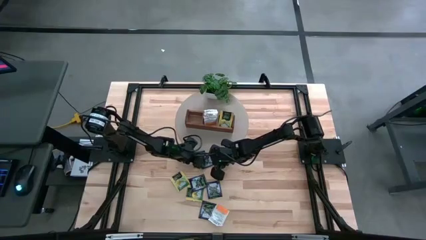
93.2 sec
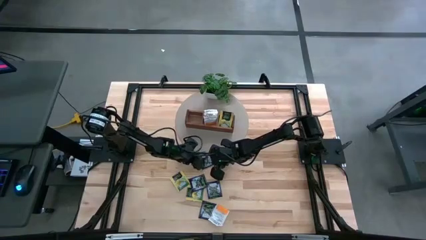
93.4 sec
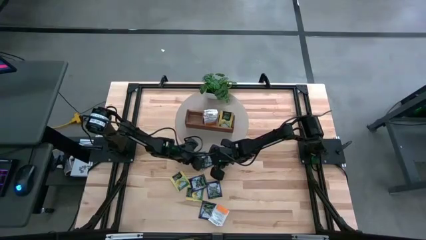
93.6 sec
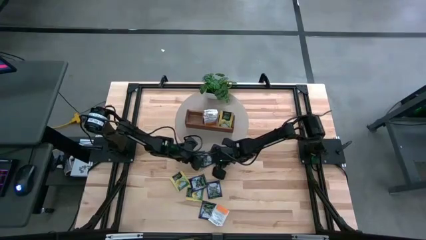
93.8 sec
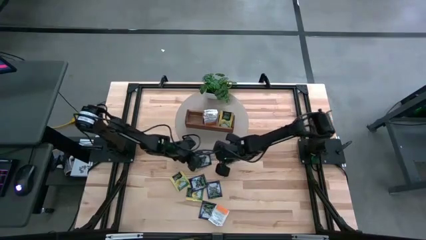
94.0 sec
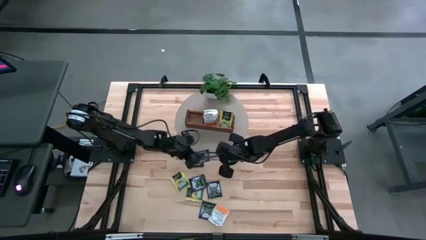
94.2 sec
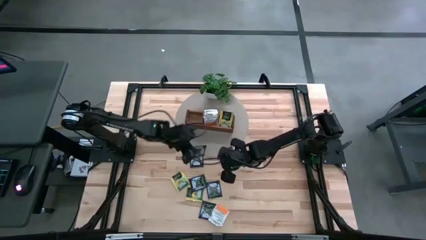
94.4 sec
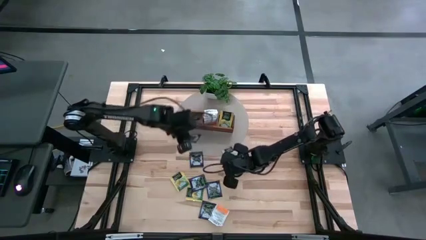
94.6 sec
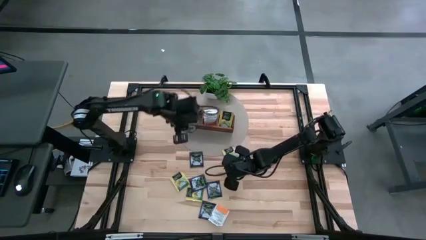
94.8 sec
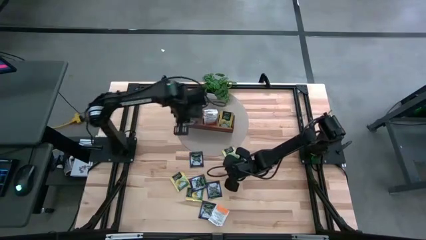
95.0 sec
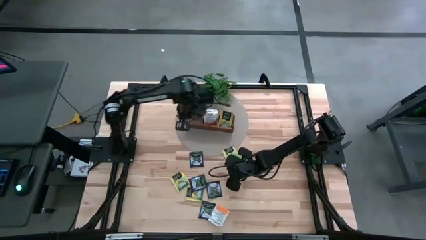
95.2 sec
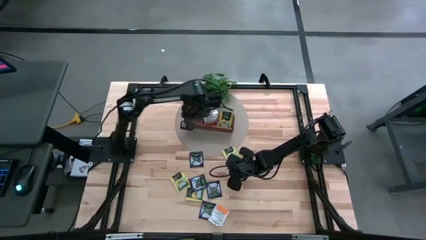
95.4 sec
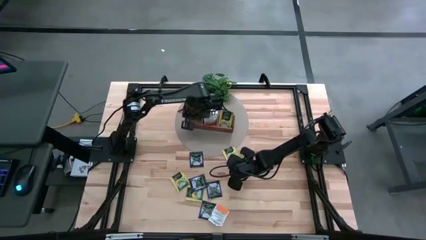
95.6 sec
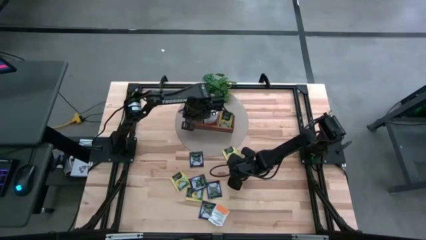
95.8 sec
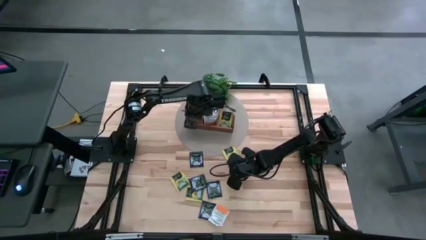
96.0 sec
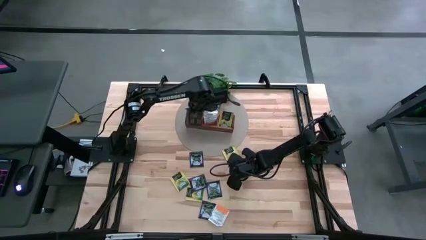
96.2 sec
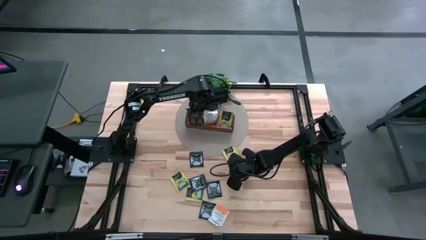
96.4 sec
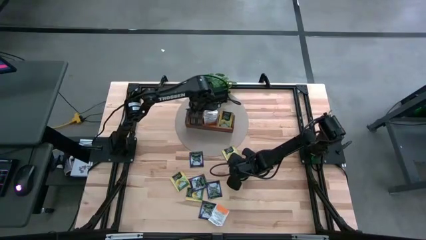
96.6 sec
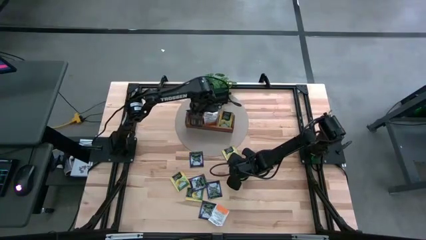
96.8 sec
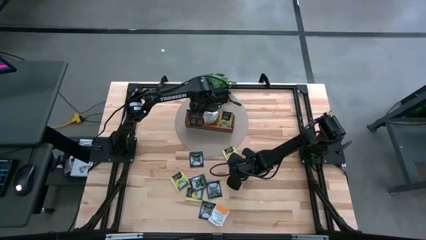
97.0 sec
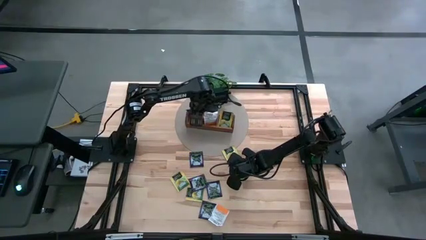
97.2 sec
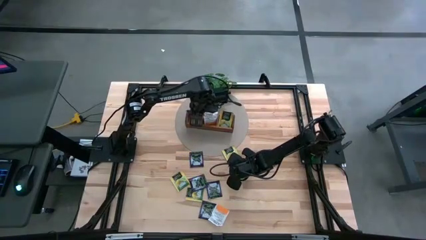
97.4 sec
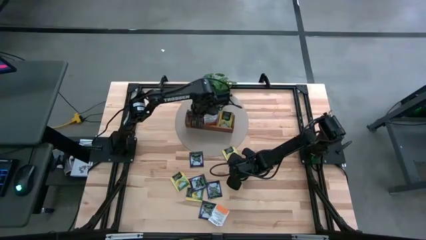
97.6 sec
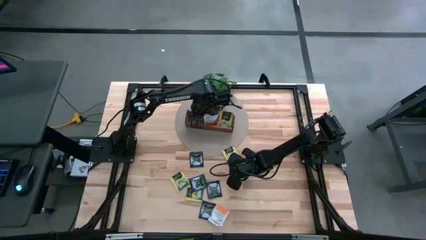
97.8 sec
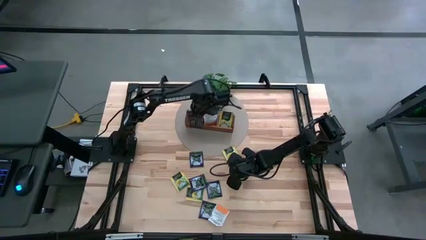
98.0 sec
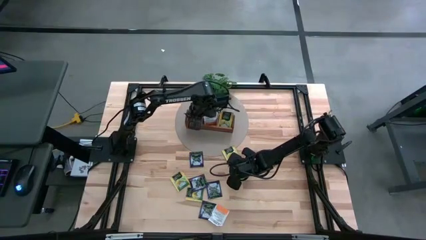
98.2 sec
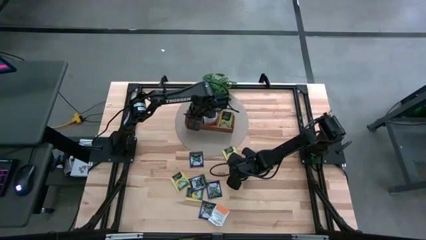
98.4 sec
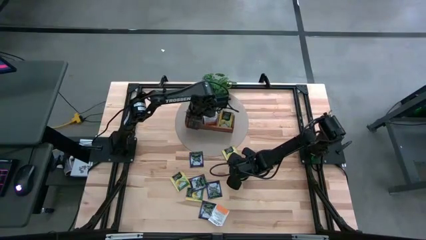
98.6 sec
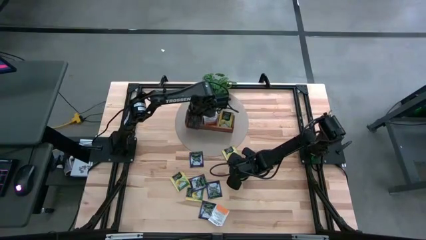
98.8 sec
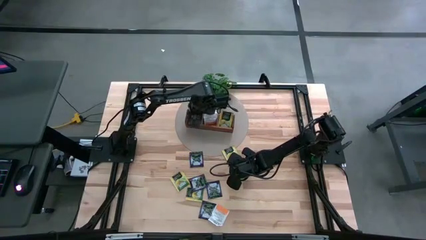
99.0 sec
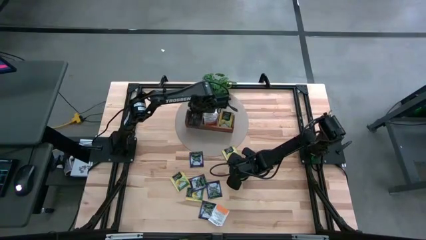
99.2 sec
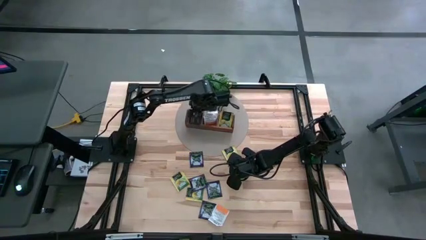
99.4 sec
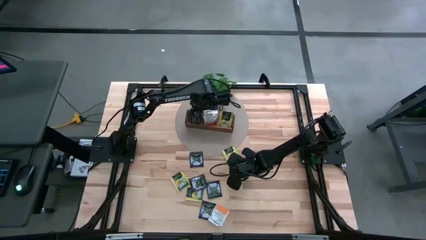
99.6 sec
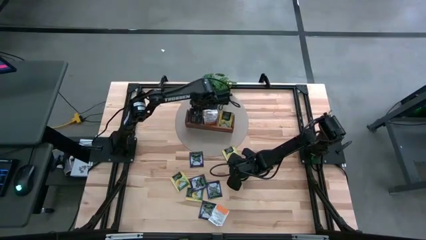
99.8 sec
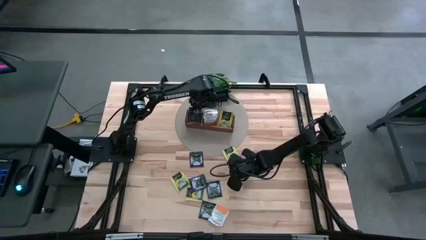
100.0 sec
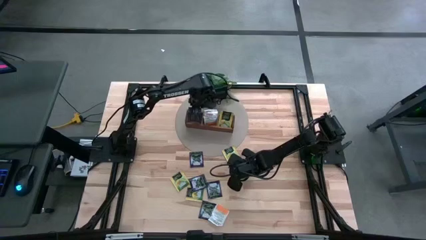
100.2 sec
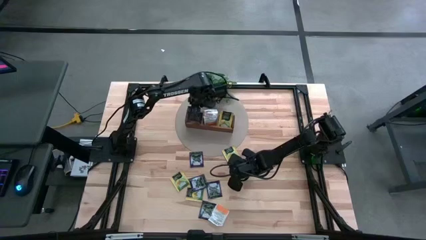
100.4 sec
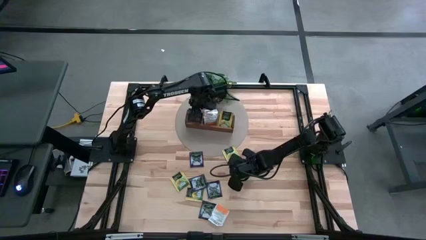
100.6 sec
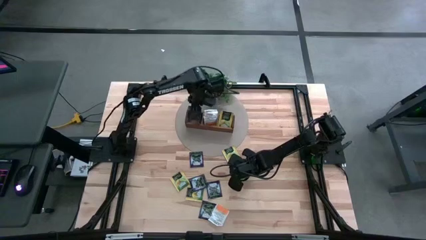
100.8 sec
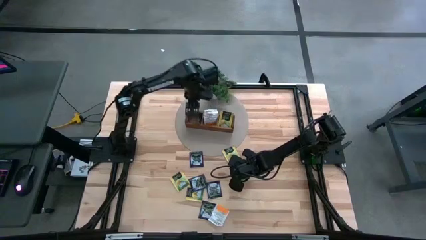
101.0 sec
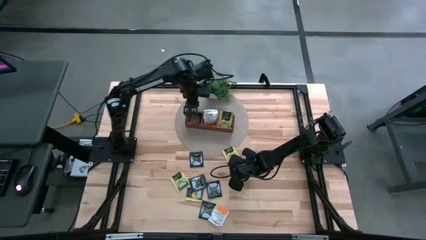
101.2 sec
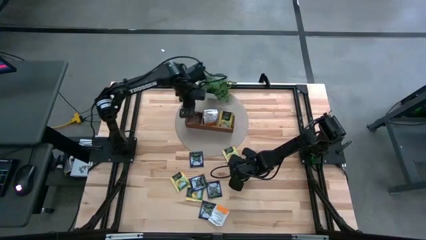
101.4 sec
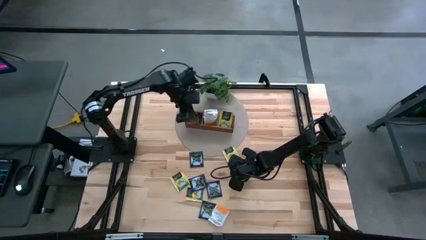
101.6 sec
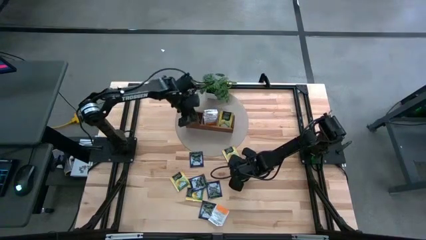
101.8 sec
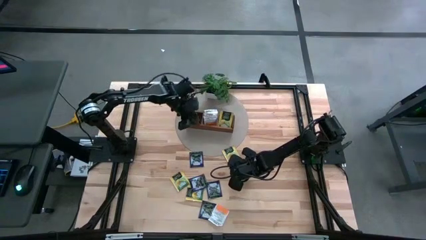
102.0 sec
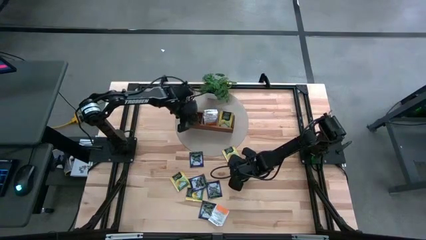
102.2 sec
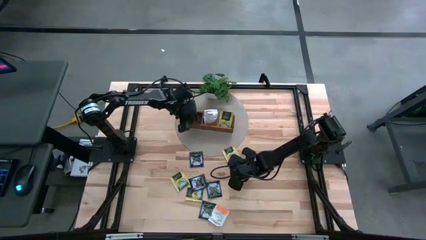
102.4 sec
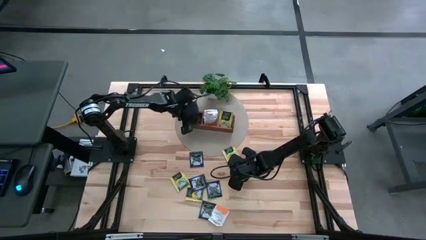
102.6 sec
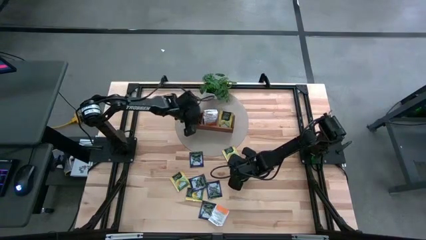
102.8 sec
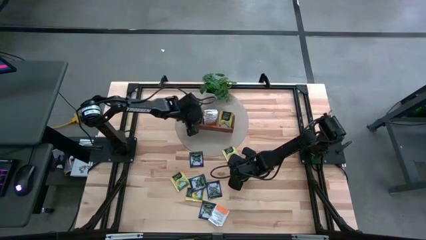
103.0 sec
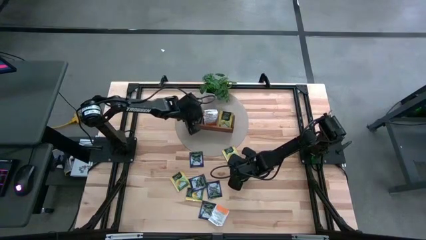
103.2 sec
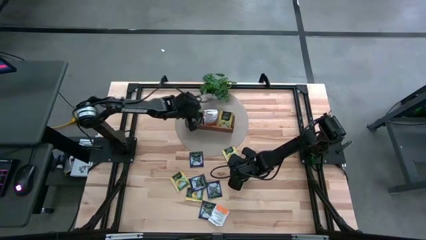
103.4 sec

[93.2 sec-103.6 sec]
Task: Pick & Place Tea
Put the purple tea bag into the left section of the wooden organizer

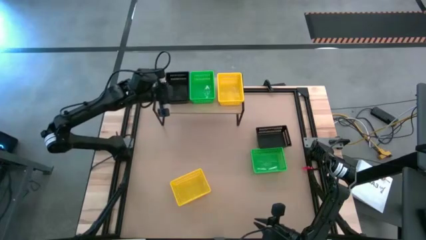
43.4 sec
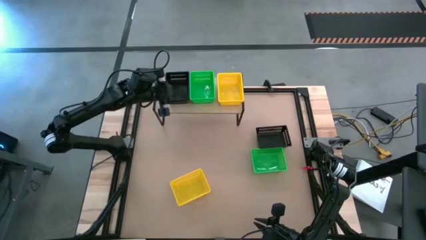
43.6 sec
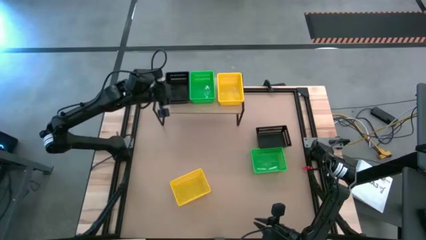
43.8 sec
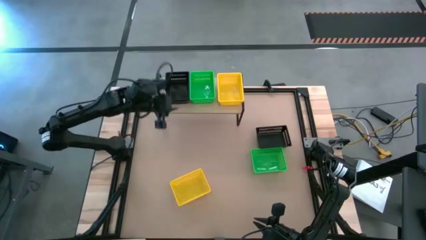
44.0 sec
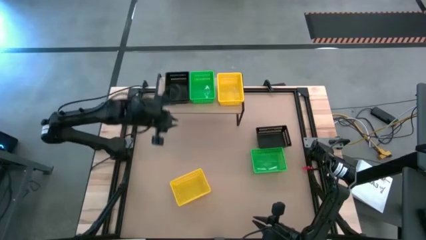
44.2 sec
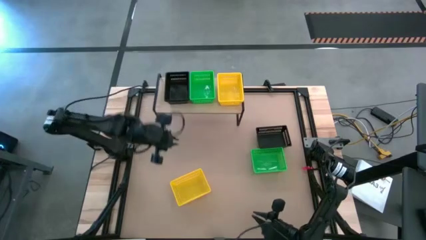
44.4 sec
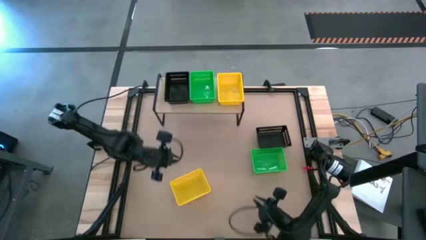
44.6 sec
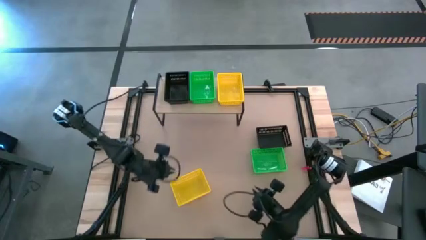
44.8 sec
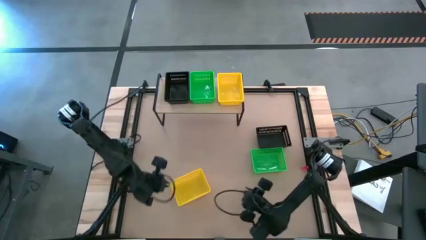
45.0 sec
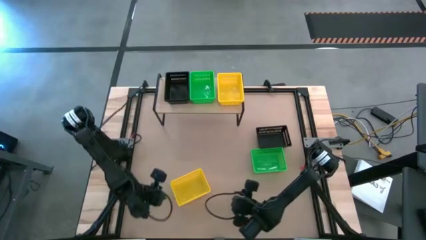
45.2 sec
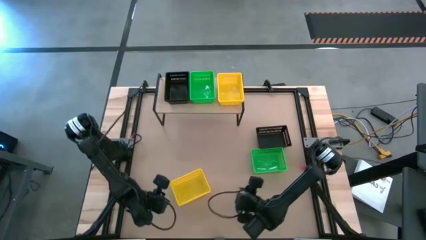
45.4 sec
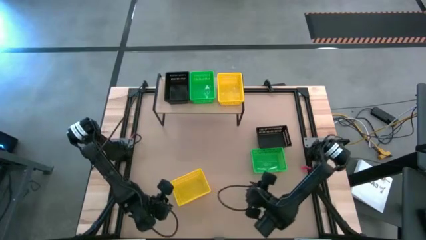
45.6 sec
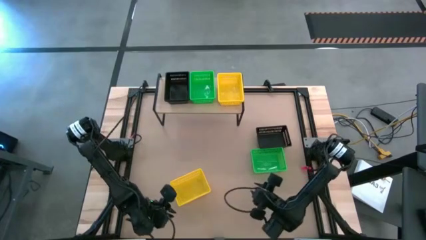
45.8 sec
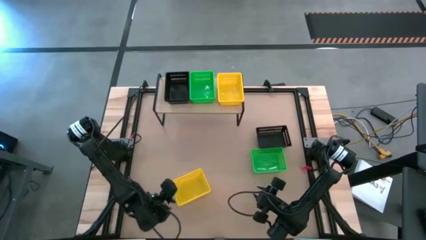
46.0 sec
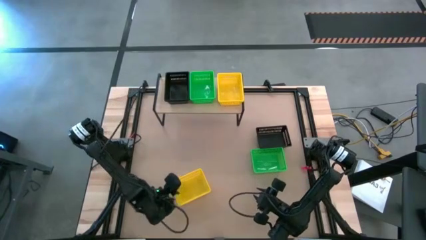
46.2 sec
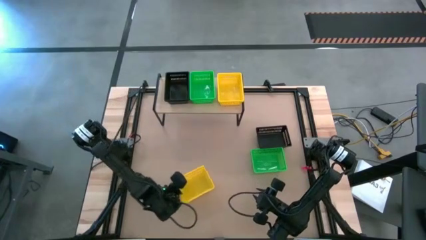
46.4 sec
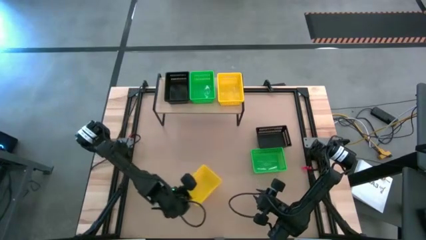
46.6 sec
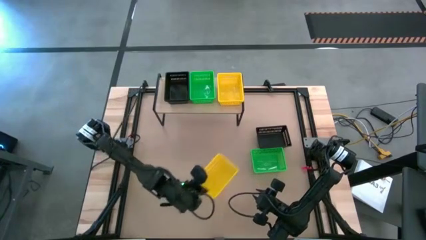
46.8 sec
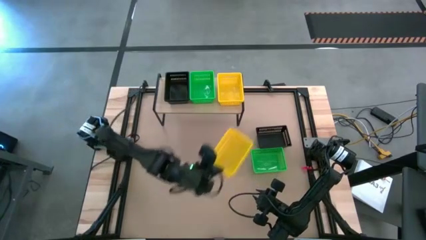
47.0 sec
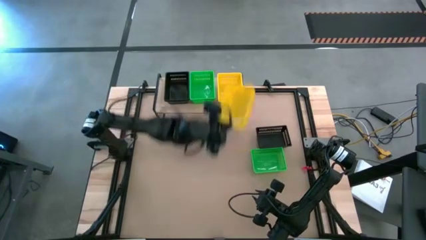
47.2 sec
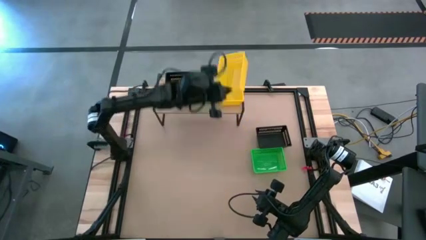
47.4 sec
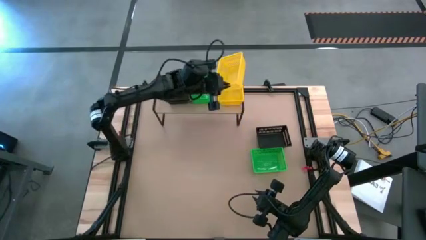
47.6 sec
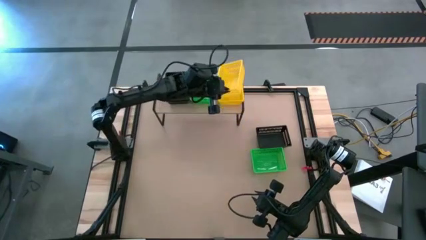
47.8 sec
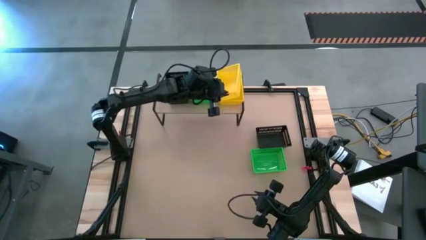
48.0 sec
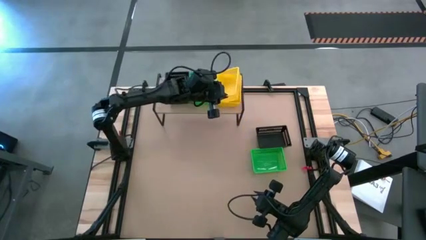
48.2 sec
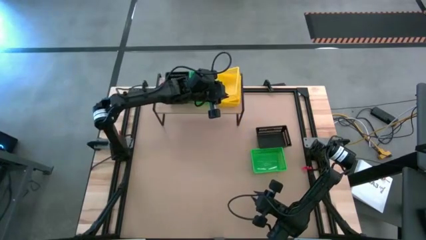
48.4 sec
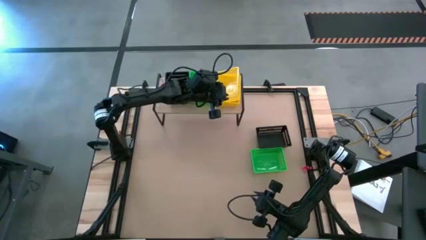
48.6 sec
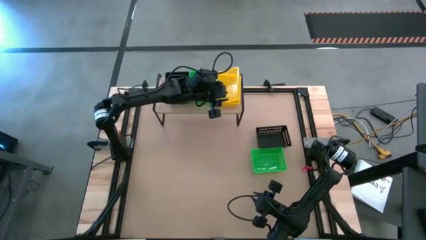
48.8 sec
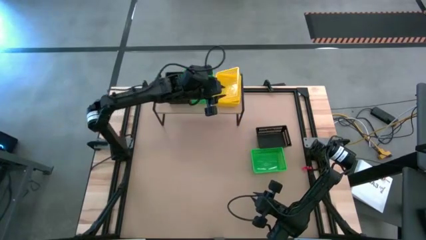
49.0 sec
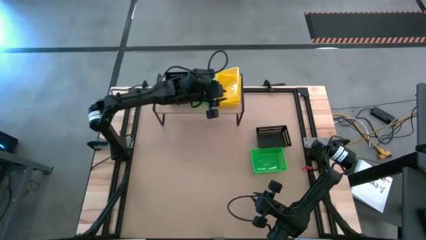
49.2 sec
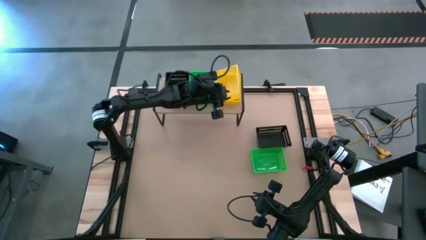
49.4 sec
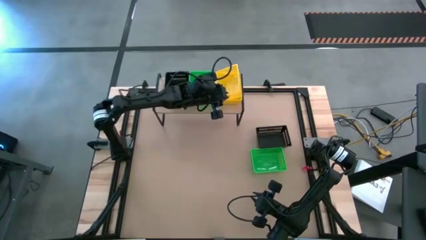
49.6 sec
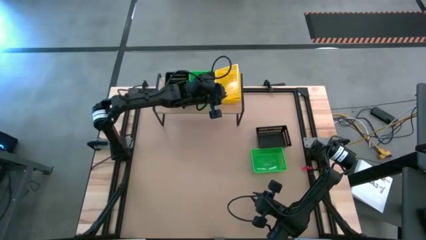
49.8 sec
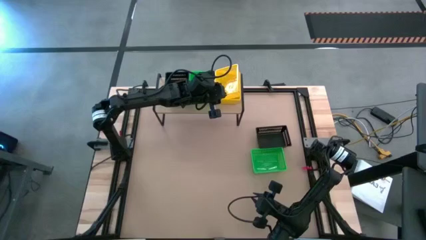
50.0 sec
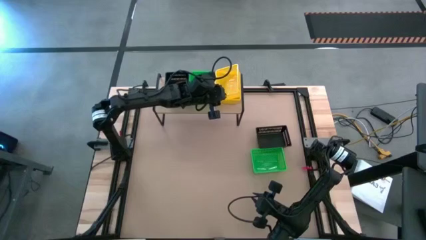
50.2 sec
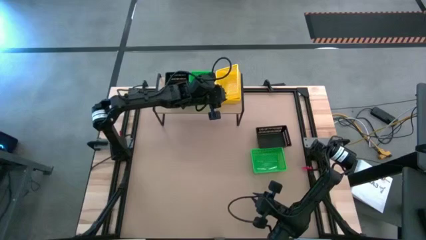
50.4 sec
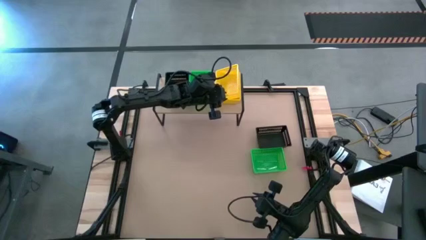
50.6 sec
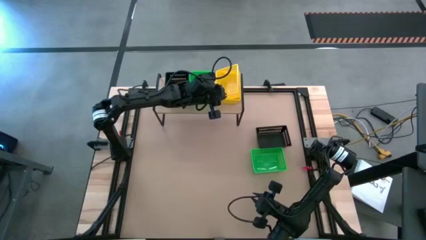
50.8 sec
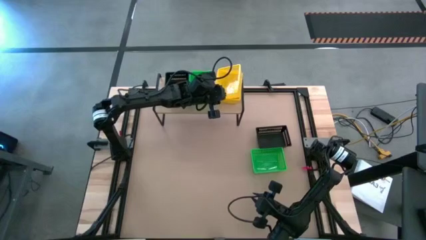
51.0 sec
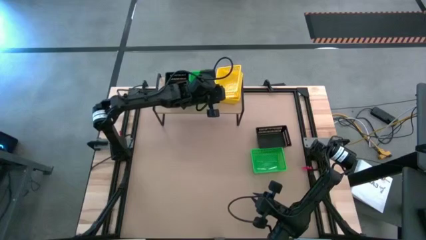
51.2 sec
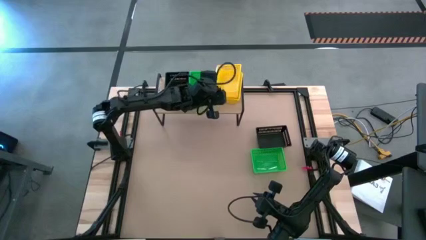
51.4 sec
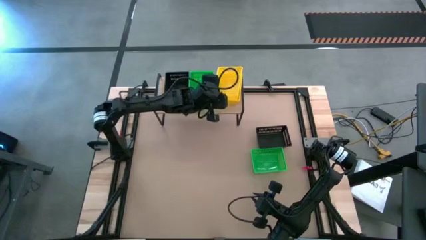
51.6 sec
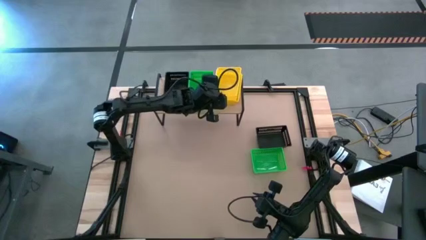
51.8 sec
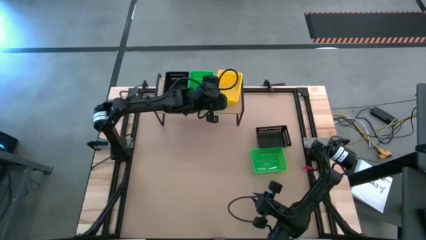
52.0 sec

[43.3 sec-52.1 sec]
Task: Stack baskets on shelf by color
Stack the yellow bin on top of the yellow bin on the shelf
